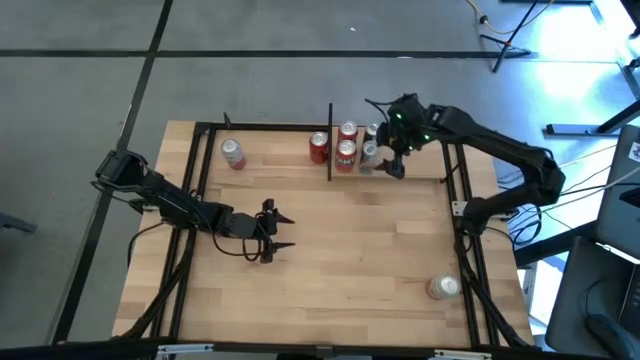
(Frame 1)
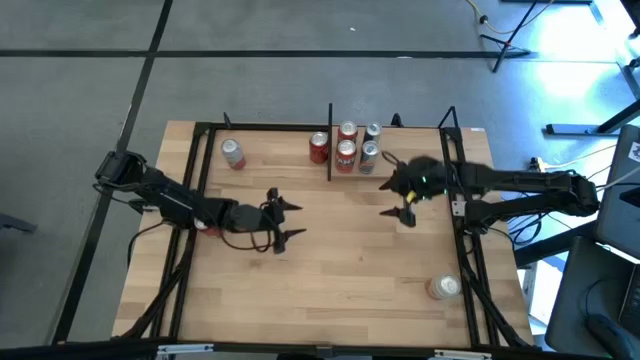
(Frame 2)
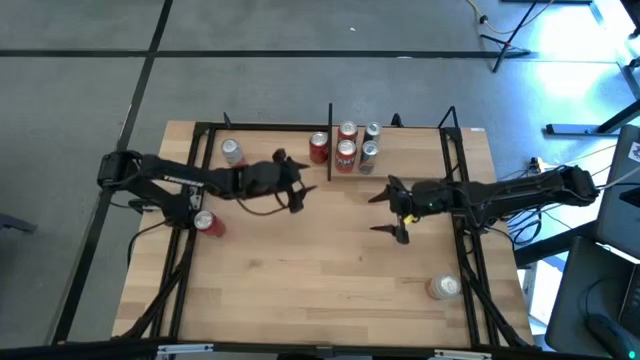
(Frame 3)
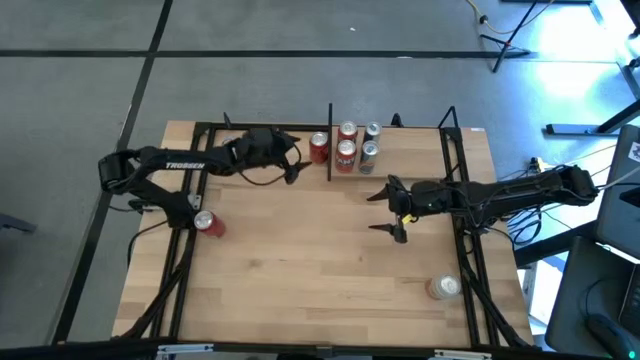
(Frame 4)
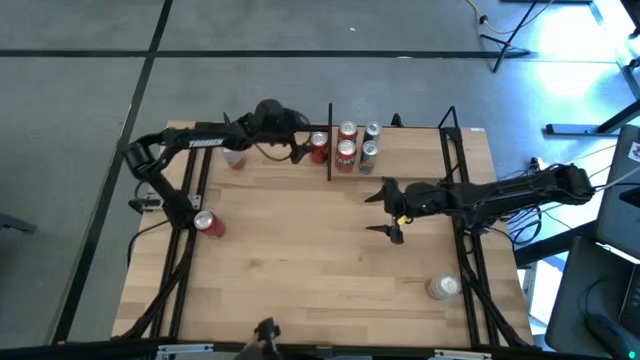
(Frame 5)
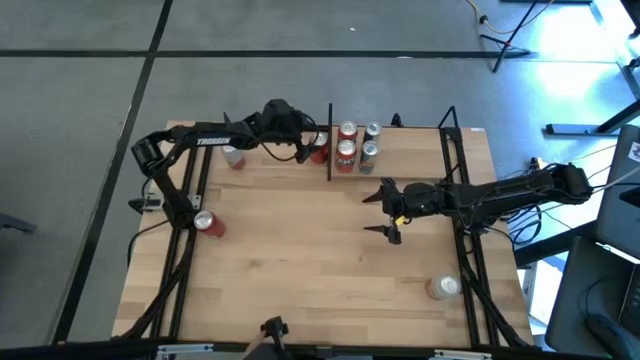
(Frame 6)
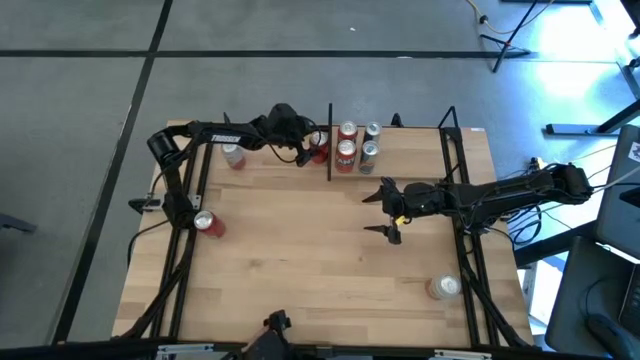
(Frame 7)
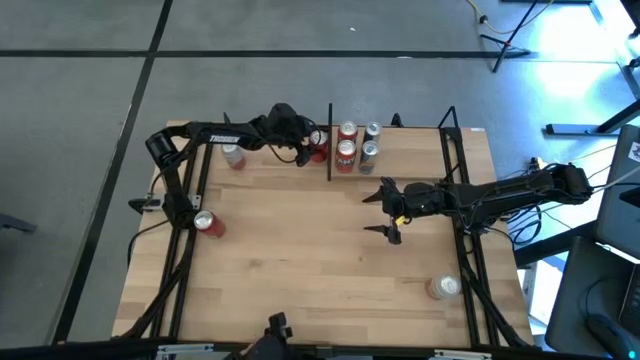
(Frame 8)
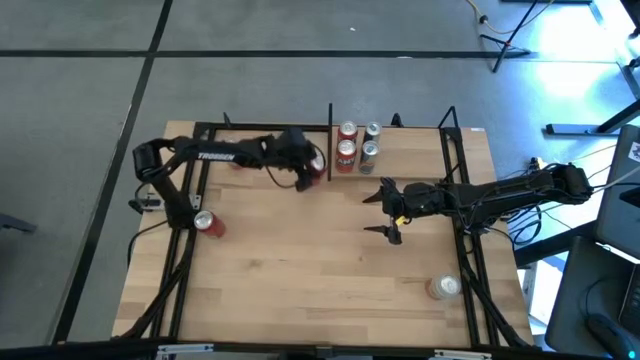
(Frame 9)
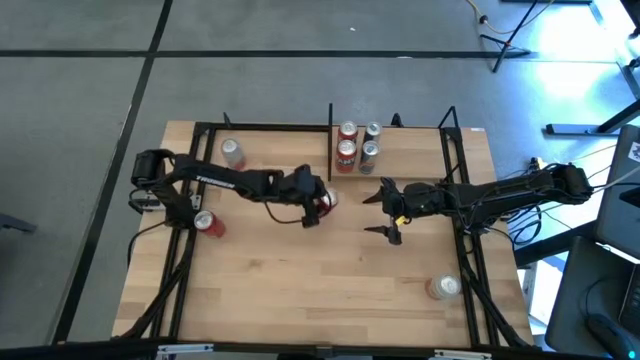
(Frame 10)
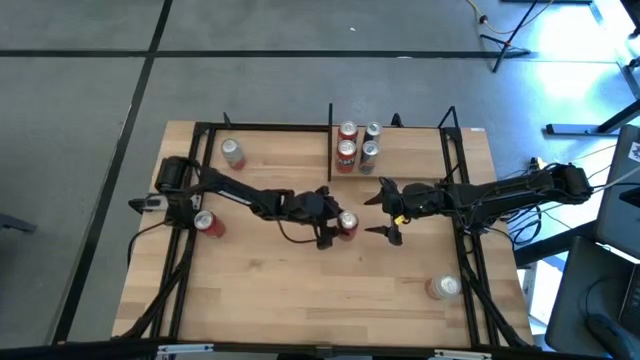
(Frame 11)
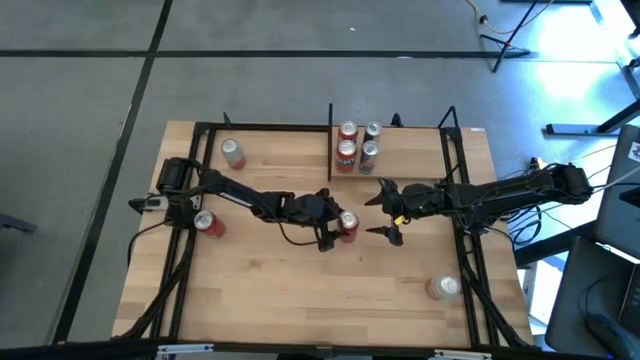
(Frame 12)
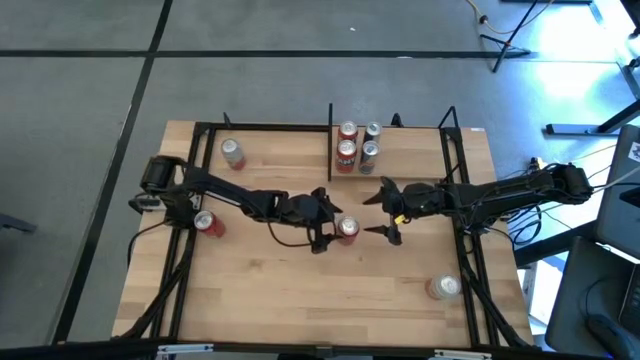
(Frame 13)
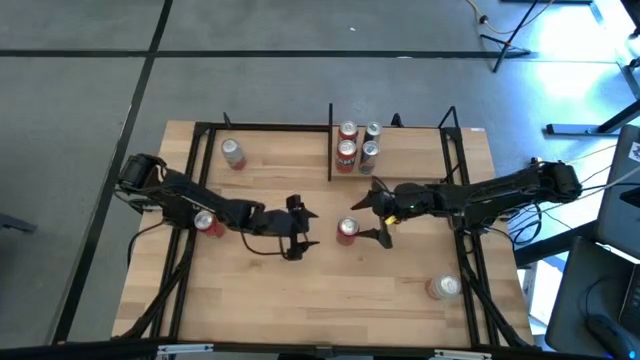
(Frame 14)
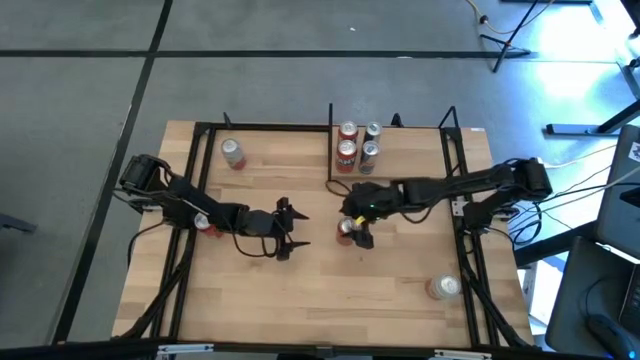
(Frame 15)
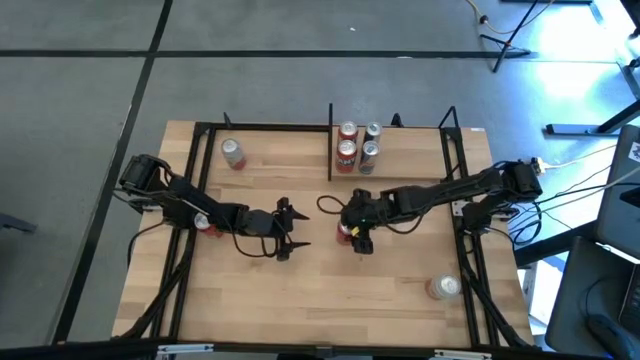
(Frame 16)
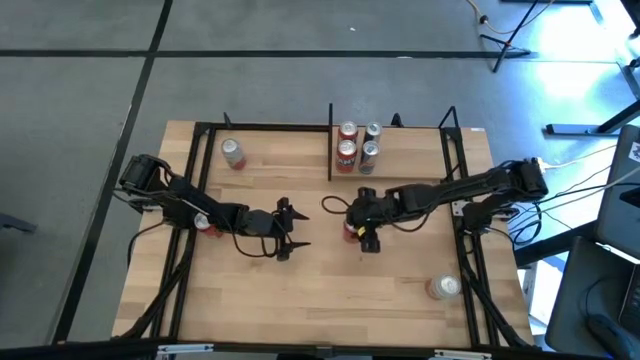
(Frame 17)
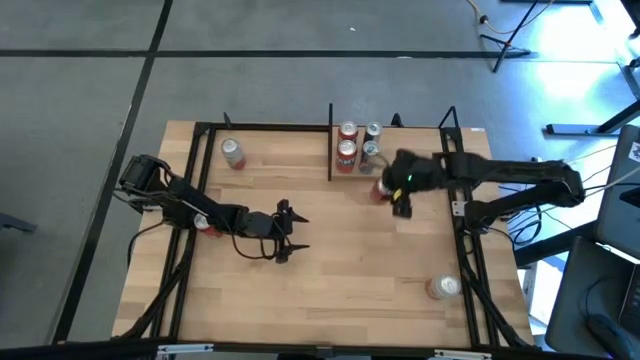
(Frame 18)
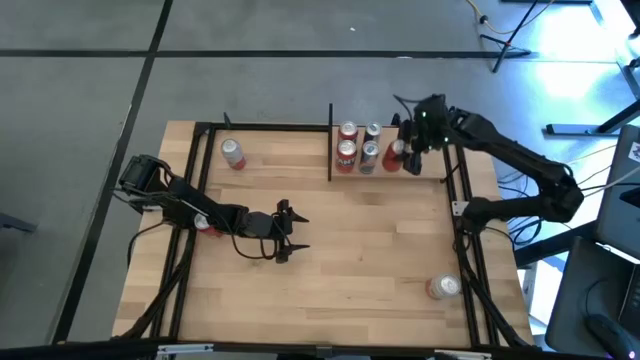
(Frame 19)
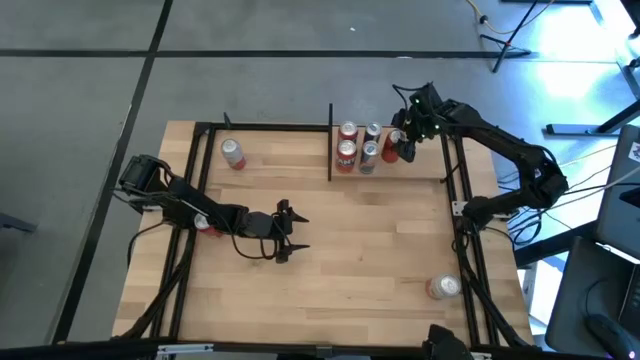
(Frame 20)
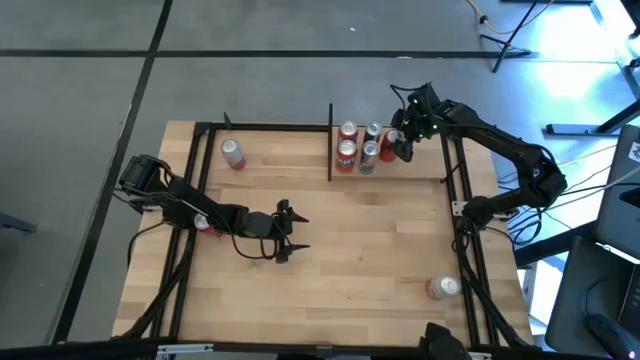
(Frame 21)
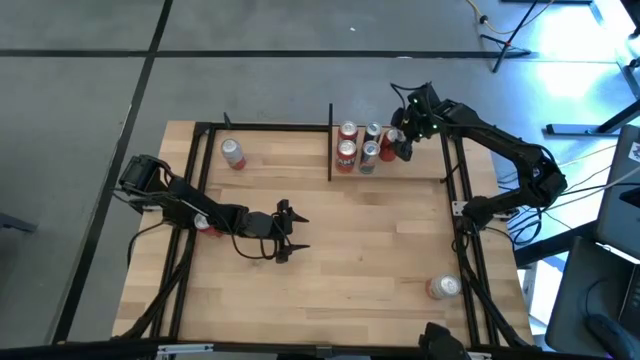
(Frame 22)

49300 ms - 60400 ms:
Task: Place canned beverage on shelf
Put the red soda can on the shelf

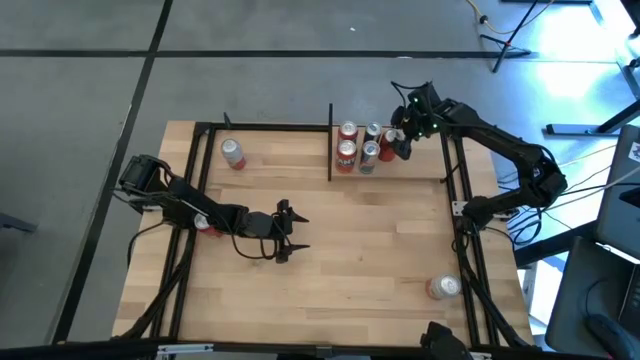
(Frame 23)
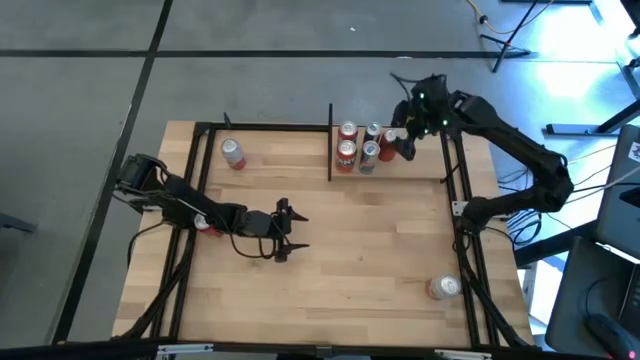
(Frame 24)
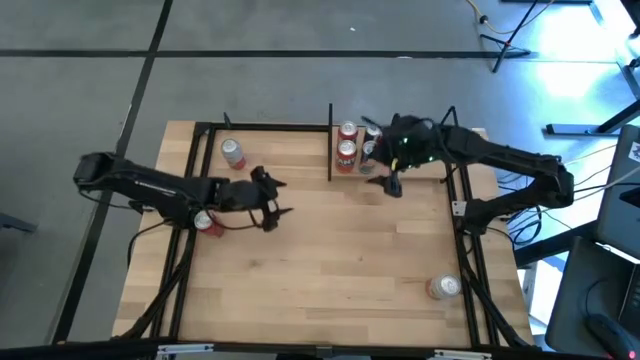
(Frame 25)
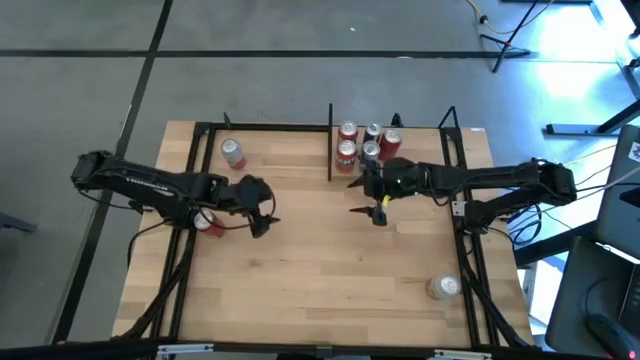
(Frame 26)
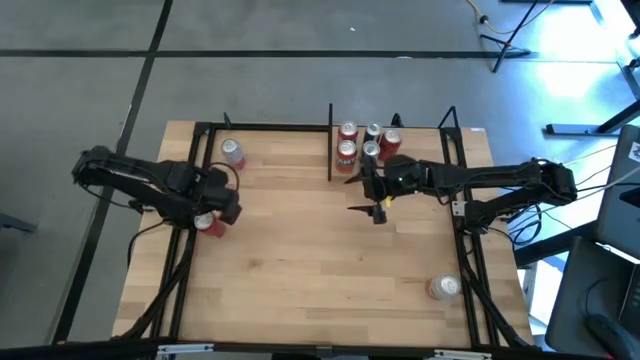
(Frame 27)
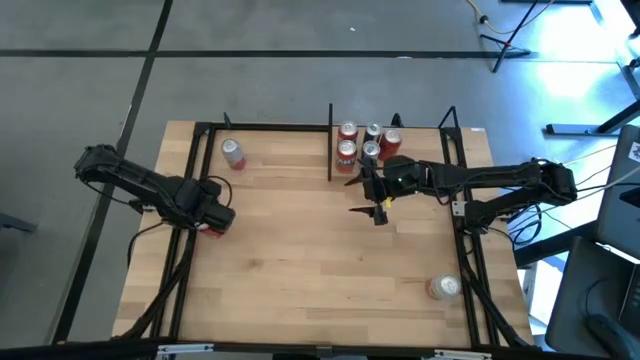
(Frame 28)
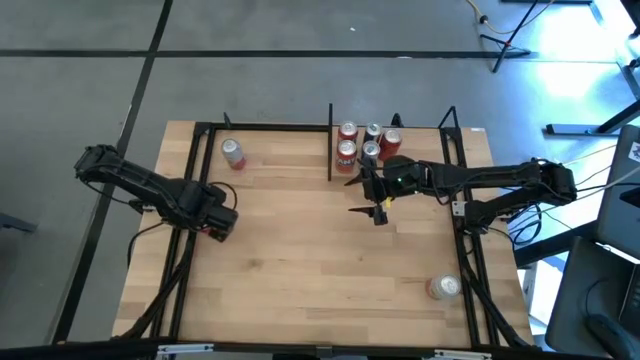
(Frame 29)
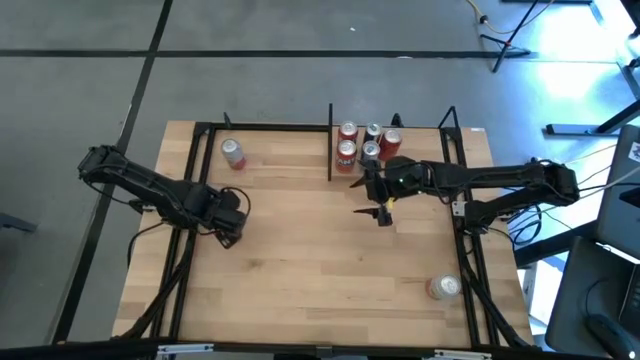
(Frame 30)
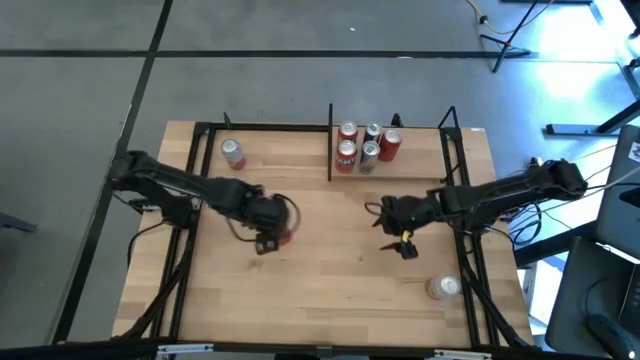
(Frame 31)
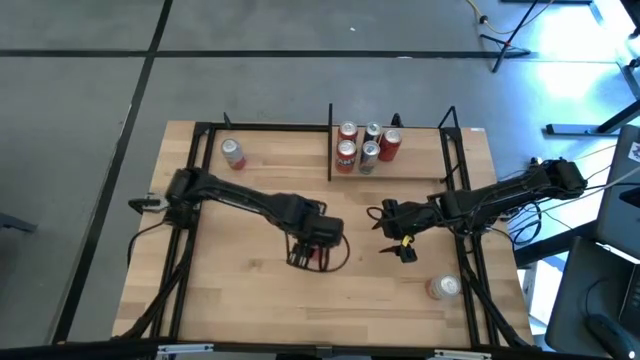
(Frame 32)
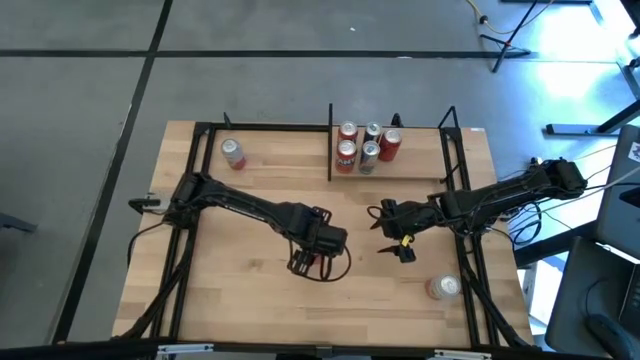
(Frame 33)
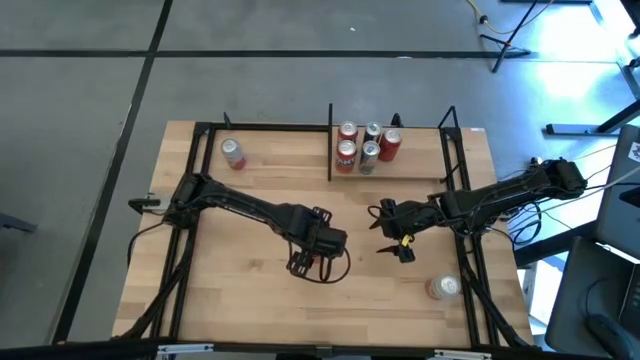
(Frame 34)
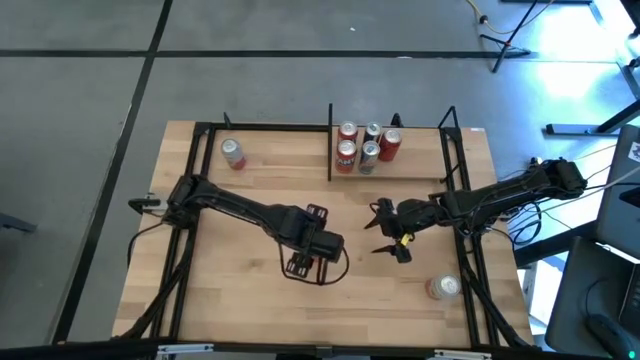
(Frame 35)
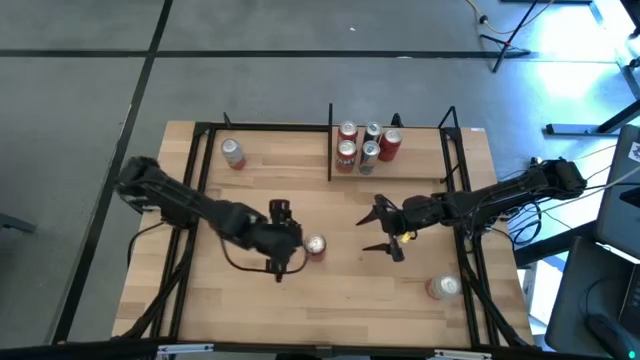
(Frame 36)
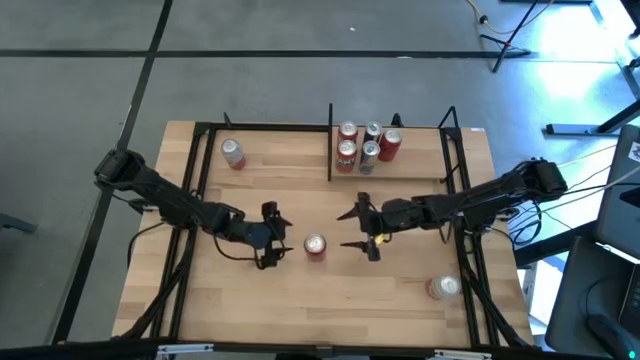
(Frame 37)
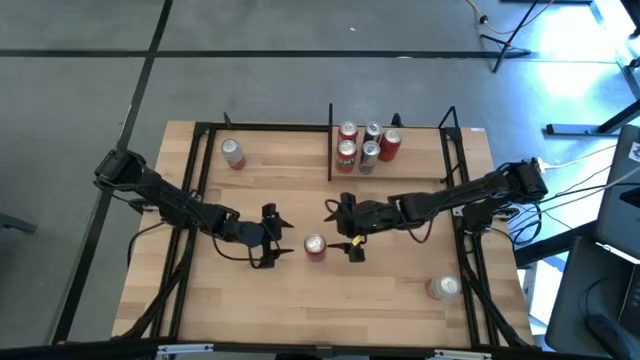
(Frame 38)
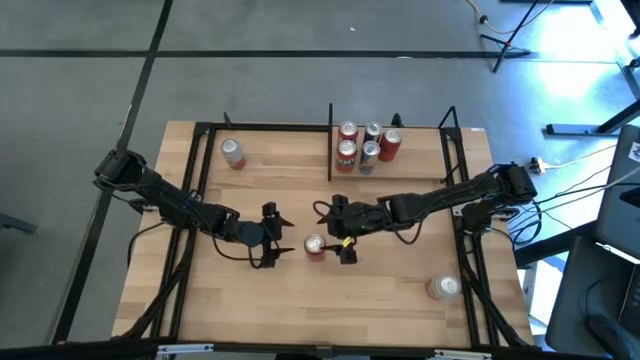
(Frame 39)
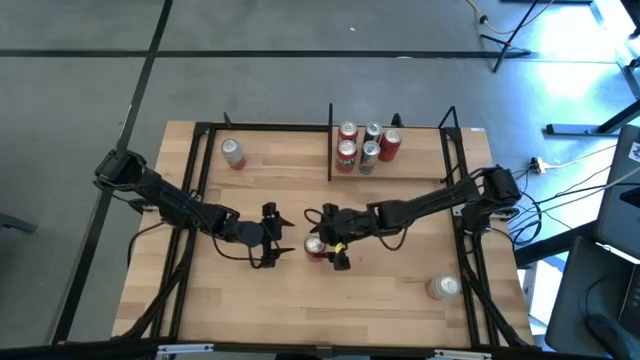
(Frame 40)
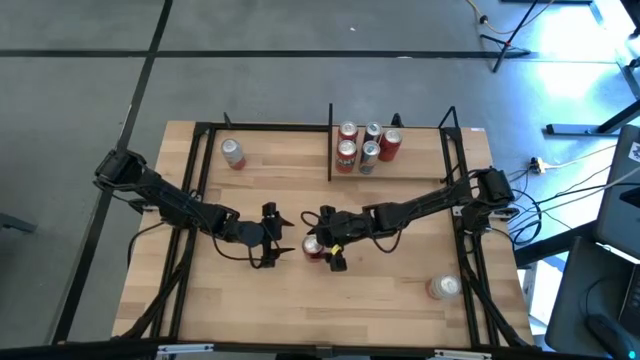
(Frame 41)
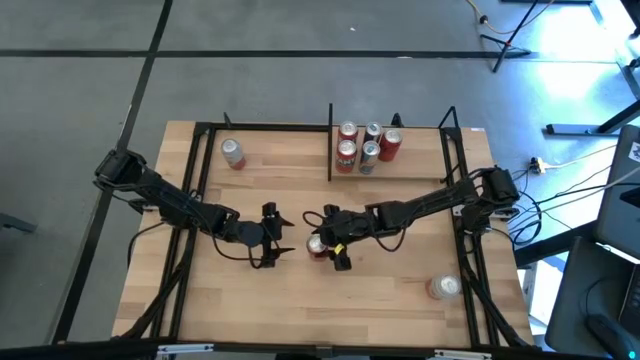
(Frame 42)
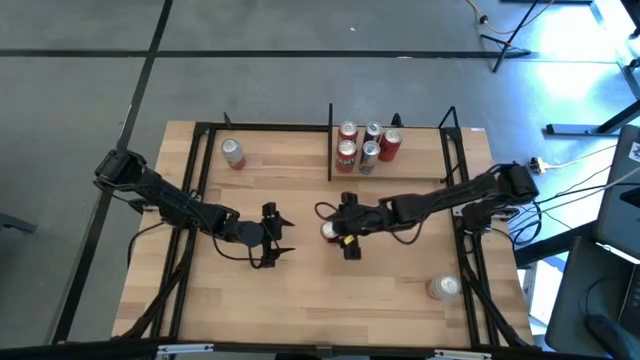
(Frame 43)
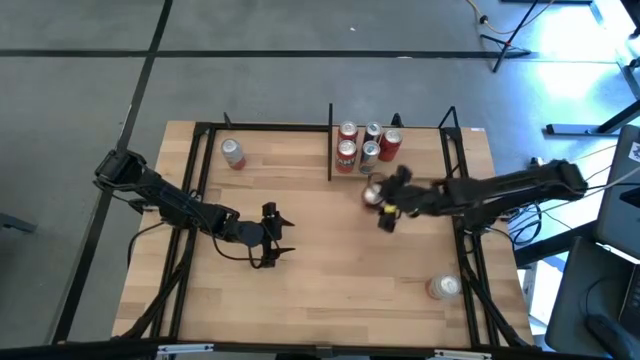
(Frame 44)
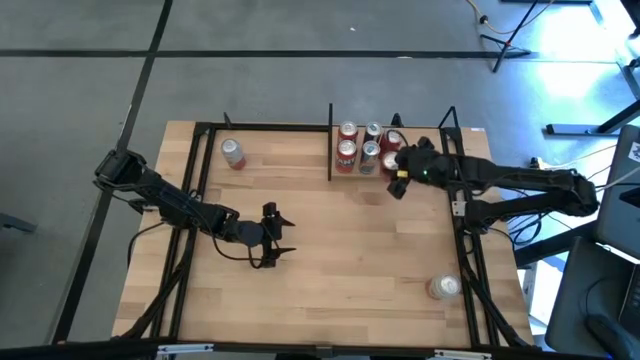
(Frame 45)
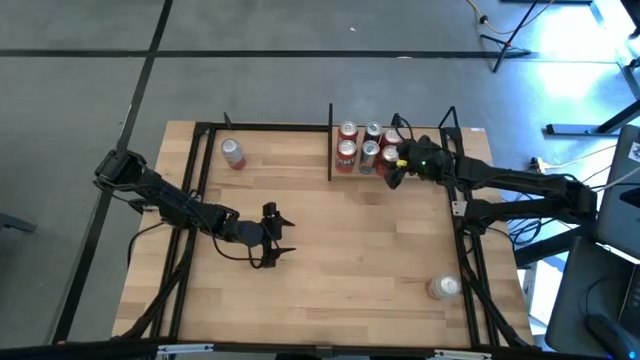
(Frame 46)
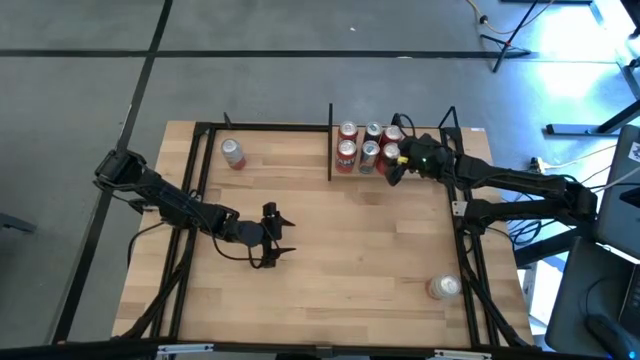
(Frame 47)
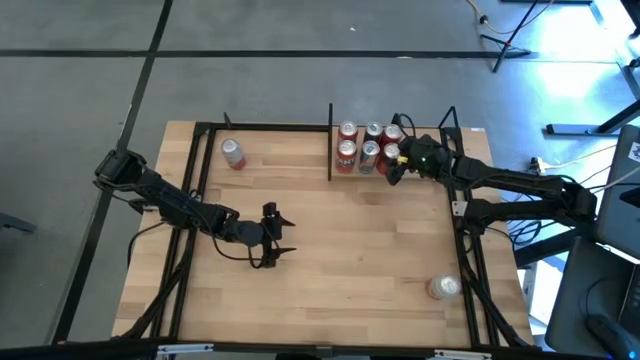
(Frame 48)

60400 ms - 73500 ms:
Put the red soda can on the shelf aligned with the other red soda can
